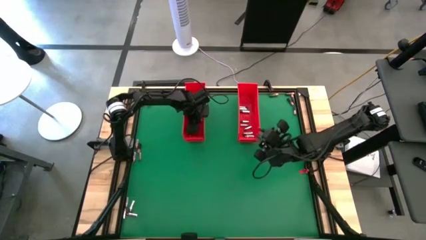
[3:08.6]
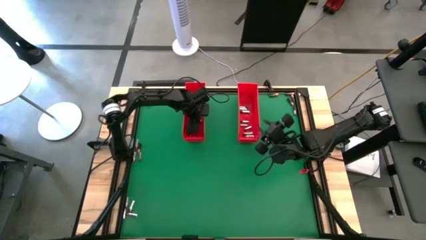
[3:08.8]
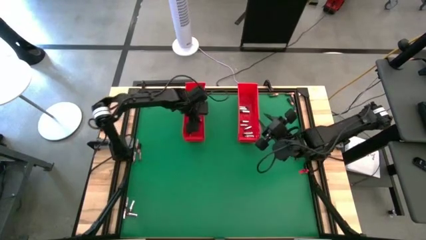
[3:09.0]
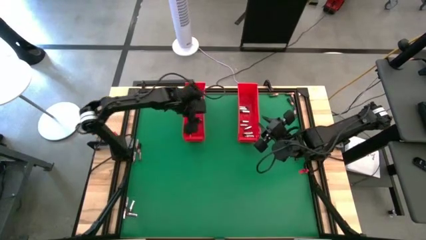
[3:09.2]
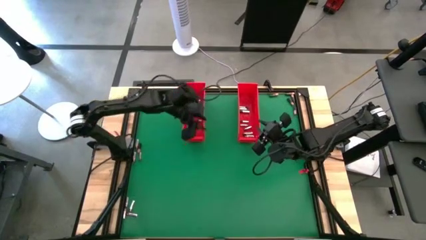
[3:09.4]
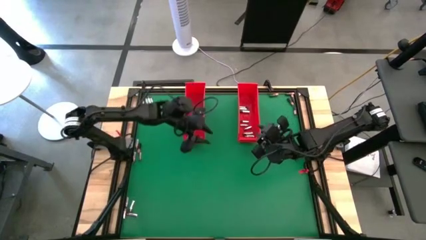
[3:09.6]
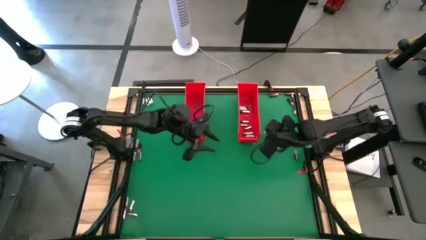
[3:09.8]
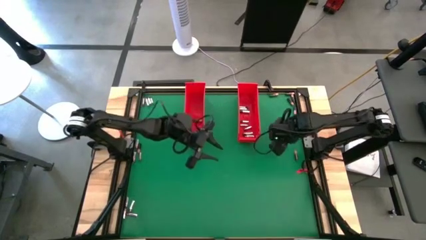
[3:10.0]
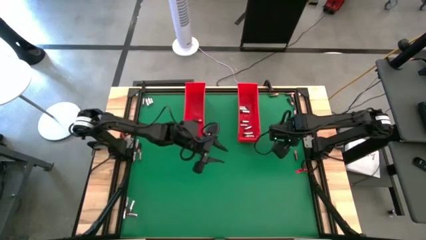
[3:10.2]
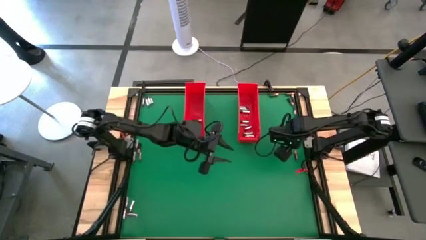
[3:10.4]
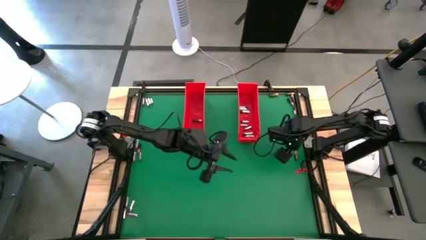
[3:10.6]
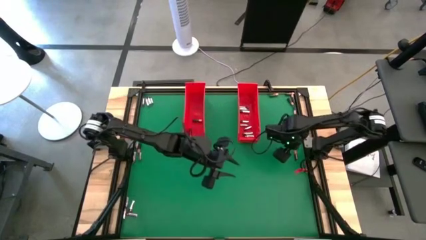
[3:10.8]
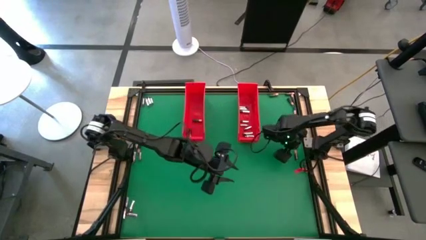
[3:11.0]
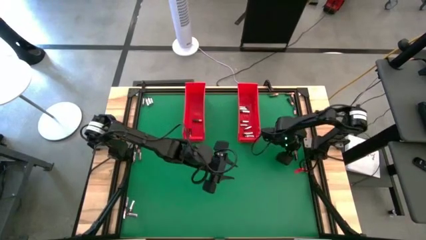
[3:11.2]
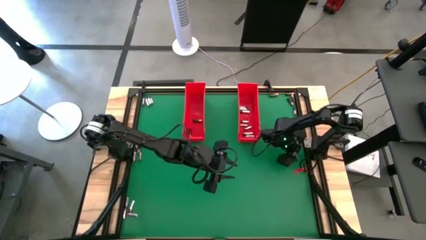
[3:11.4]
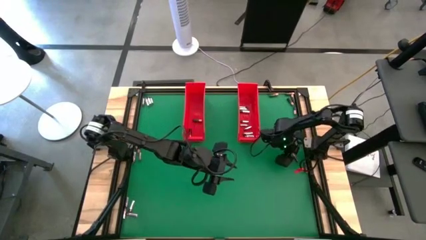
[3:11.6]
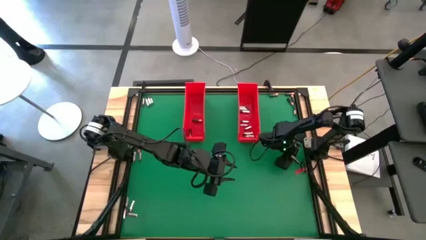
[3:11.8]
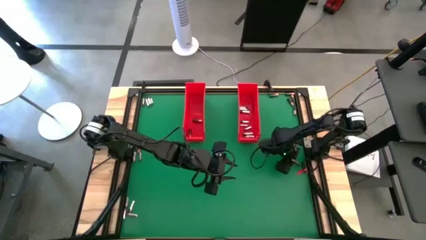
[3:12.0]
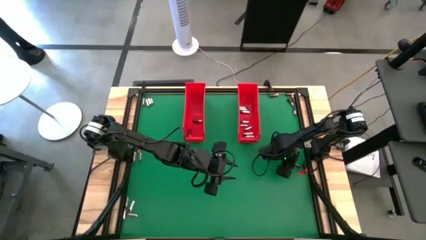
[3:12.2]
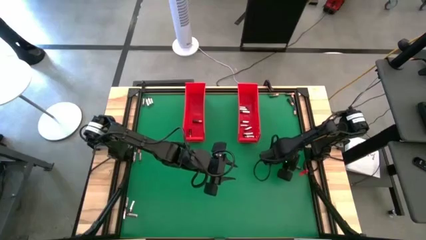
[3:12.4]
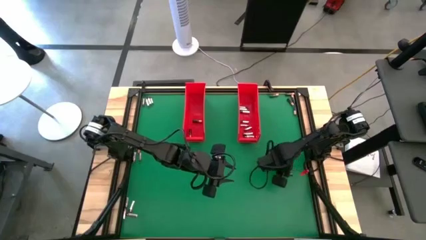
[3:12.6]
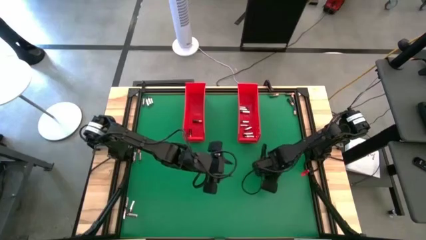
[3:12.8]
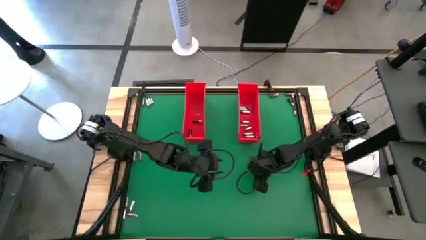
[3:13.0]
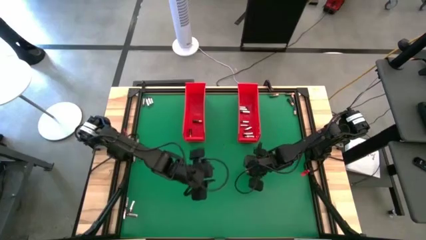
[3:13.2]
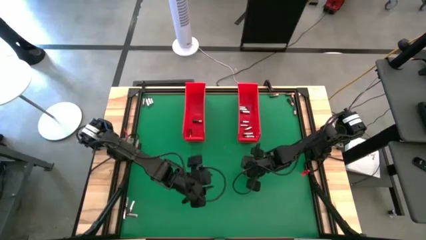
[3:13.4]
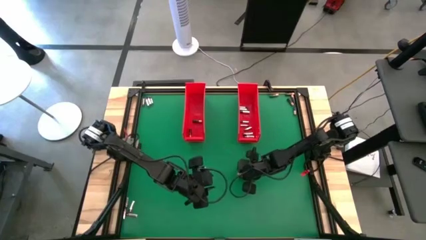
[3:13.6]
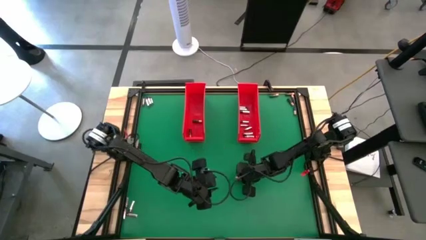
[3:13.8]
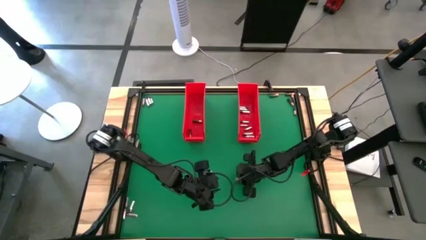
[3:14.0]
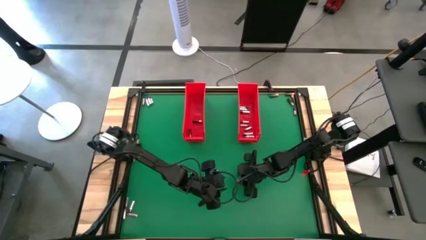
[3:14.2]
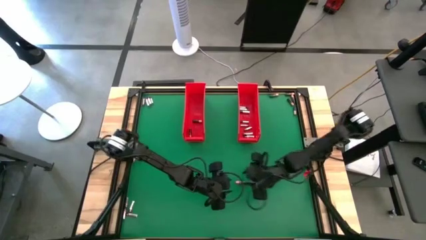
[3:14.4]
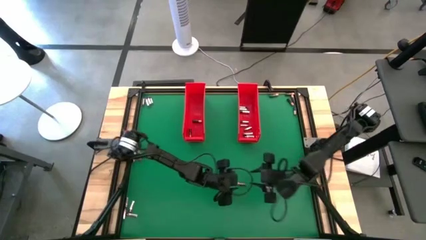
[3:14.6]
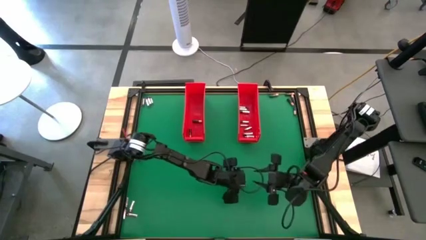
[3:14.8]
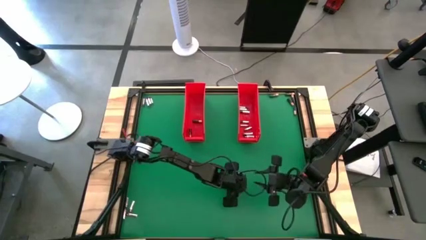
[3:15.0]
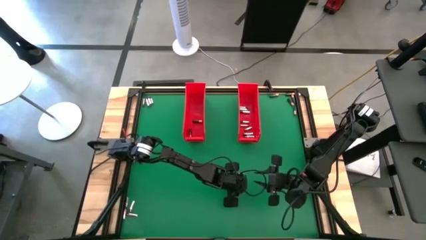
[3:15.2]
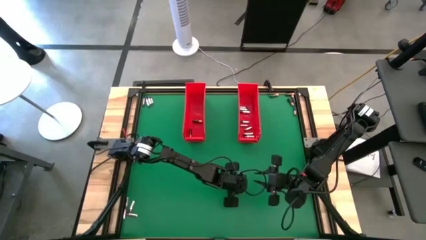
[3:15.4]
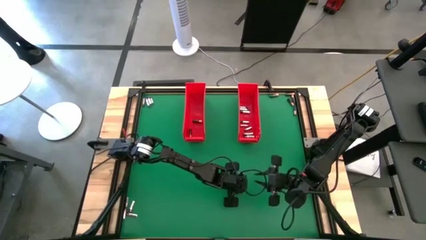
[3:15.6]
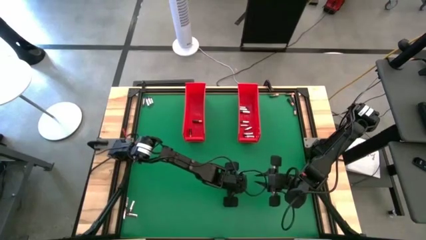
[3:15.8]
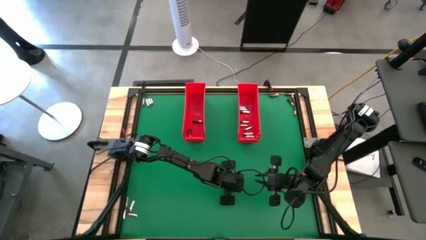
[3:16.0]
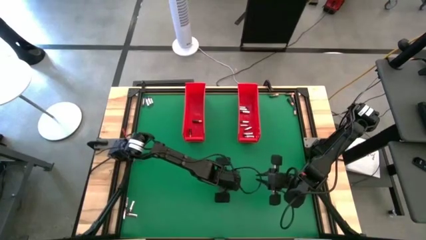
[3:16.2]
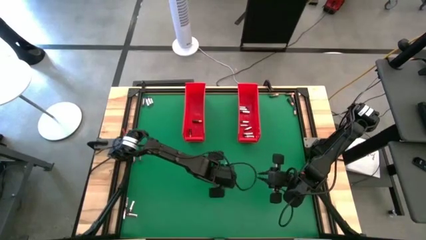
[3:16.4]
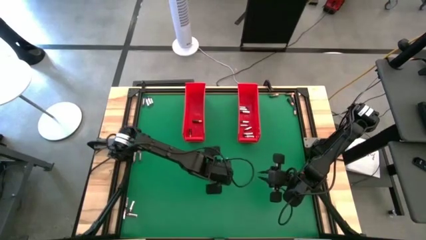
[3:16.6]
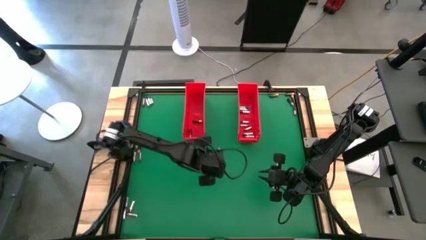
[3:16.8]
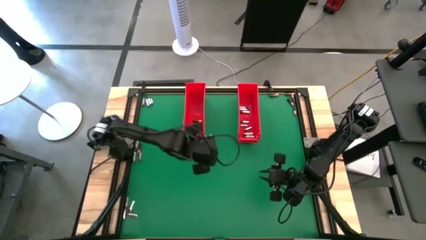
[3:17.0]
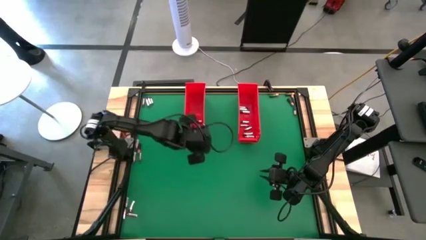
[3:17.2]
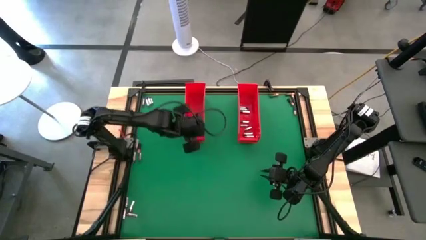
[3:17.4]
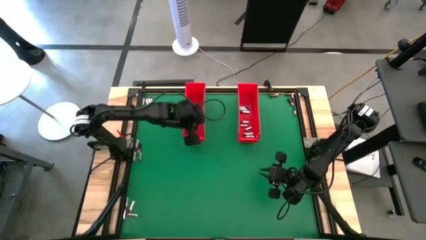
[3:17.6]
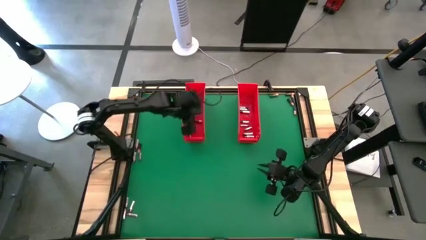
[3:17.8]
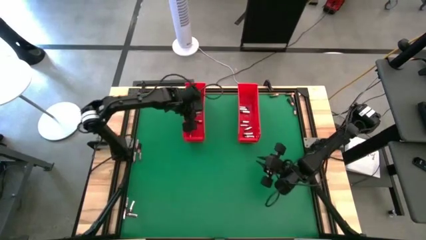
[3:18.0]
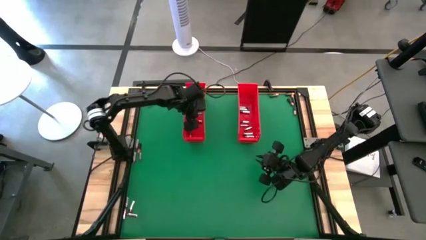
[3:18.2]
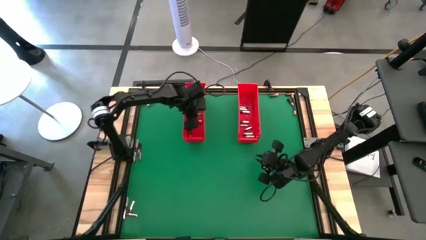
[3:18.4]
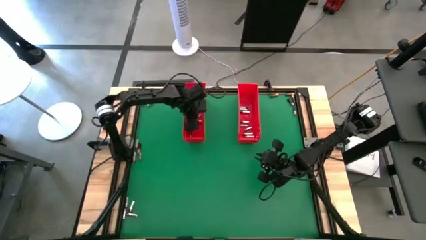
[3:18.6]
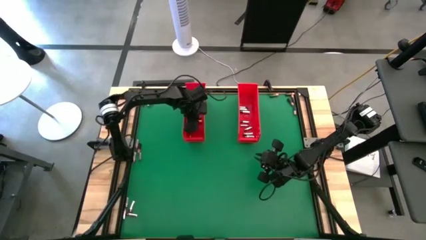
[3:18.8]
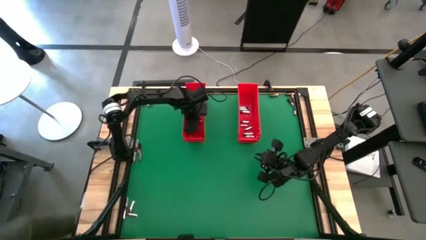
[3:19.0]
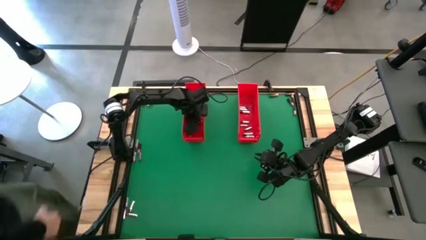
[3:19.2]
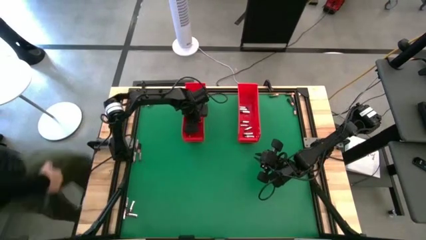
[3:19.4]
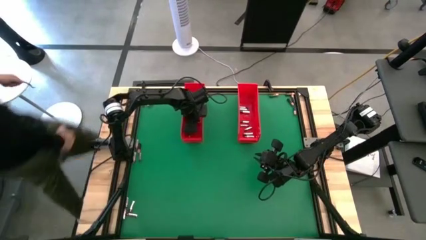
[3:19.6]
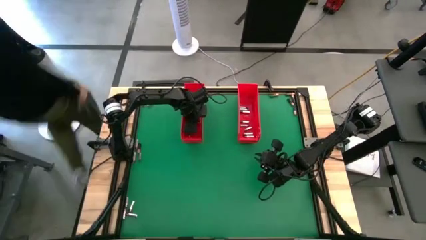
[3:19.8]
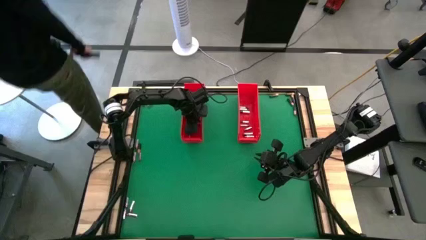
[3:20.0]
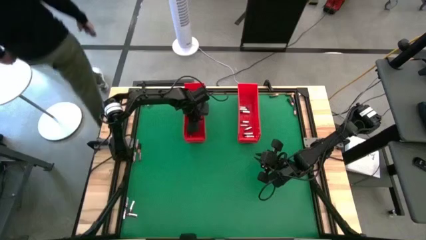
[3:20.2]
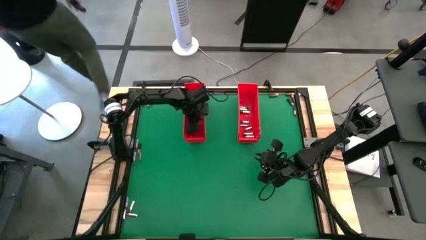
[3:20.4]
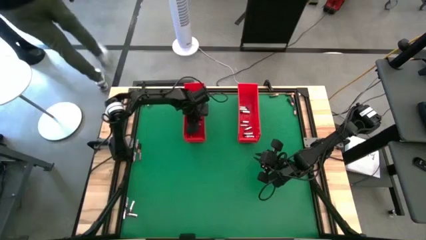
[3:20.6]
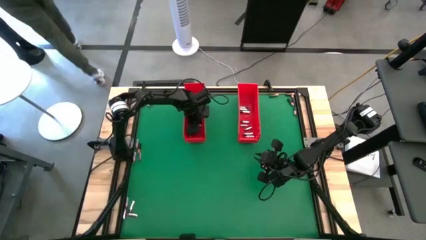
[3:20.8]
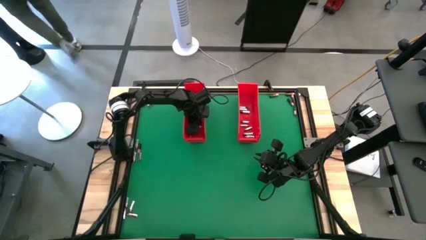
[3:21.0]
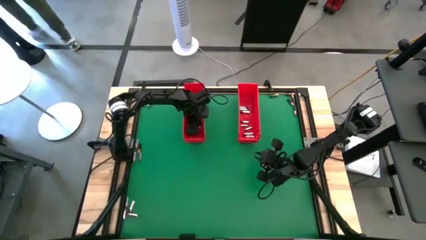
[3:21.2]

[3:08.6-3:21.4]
Task: Sort batteries
Put the brown battery into the left red bin

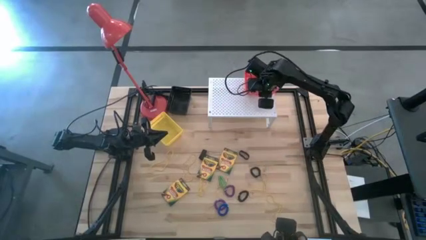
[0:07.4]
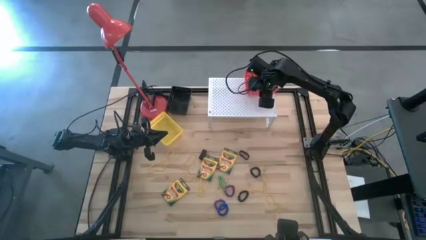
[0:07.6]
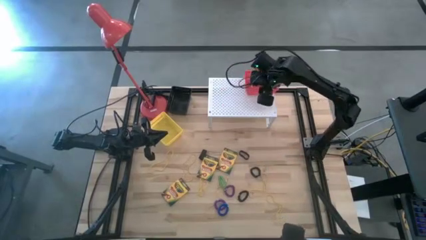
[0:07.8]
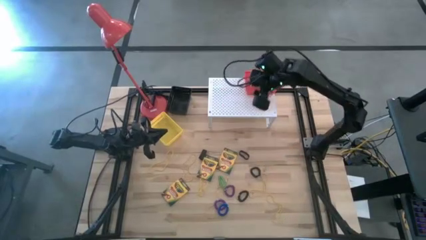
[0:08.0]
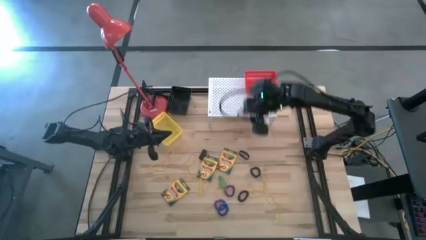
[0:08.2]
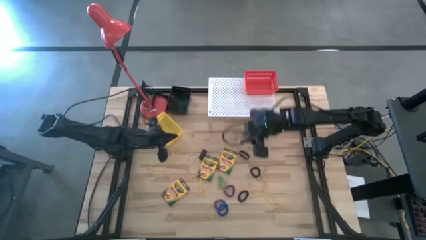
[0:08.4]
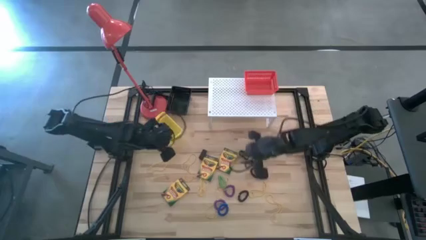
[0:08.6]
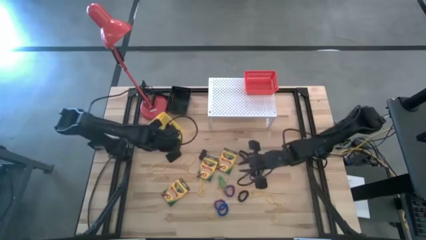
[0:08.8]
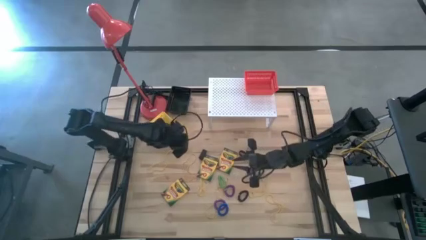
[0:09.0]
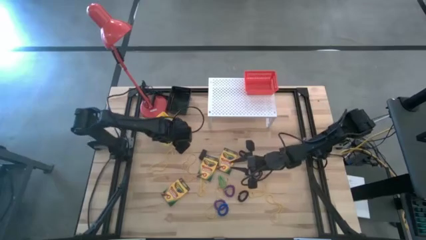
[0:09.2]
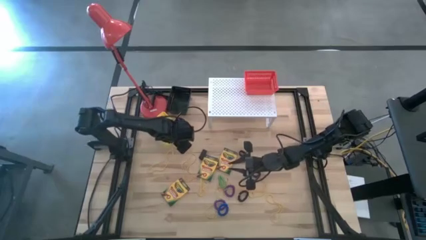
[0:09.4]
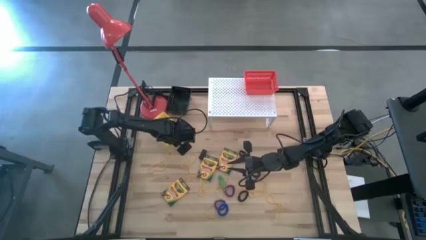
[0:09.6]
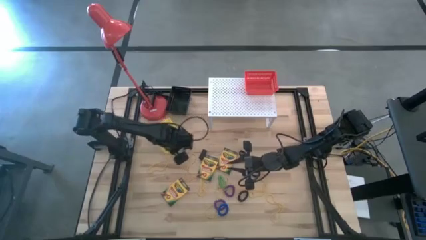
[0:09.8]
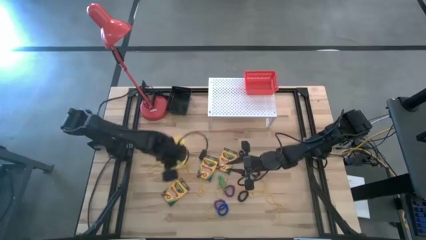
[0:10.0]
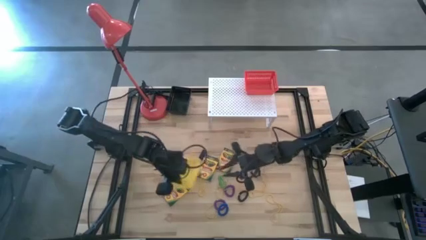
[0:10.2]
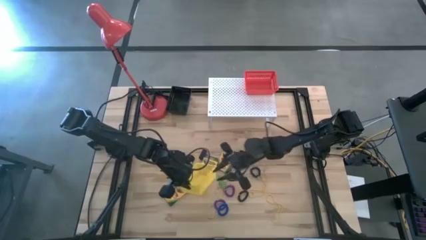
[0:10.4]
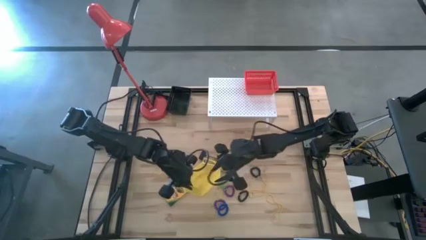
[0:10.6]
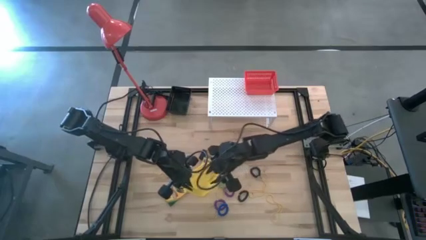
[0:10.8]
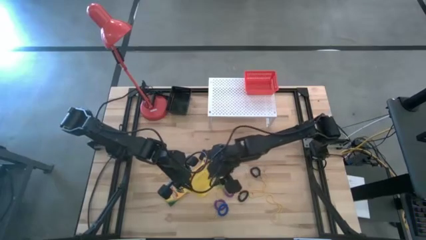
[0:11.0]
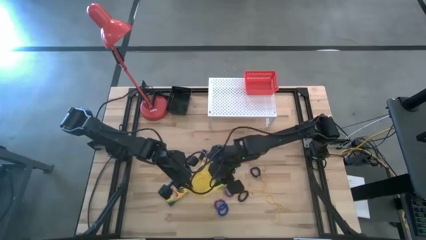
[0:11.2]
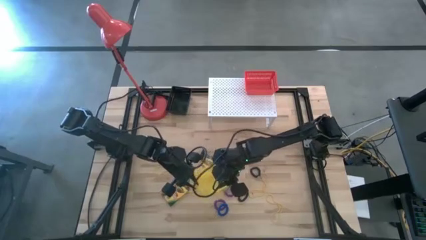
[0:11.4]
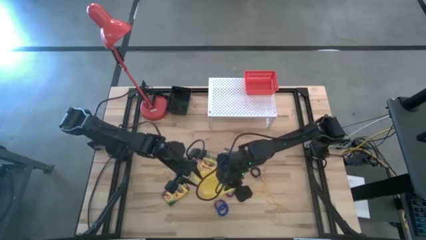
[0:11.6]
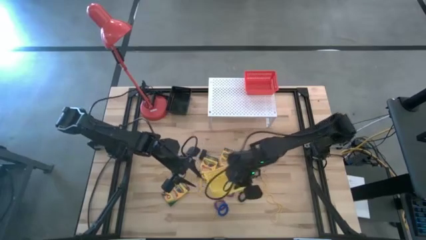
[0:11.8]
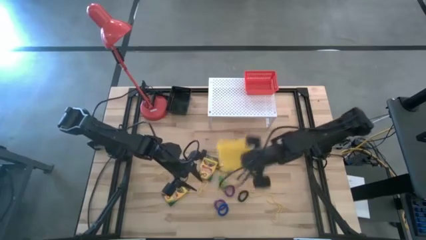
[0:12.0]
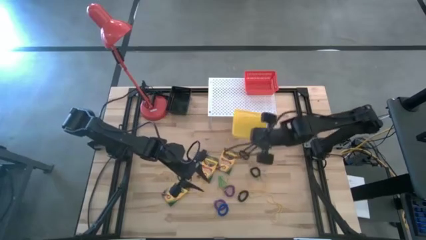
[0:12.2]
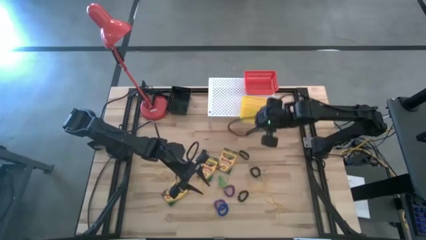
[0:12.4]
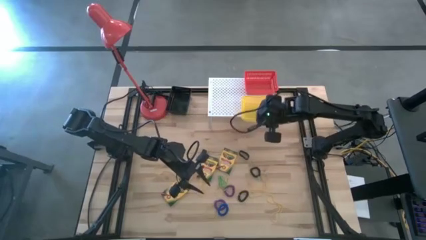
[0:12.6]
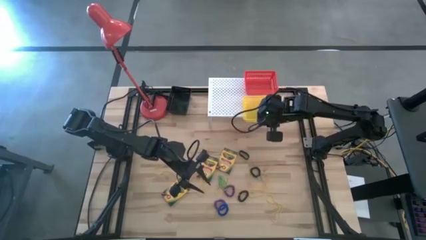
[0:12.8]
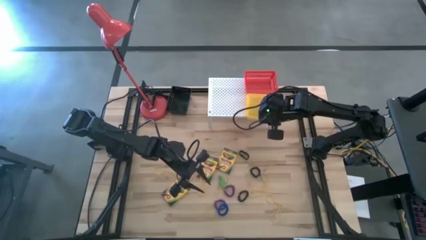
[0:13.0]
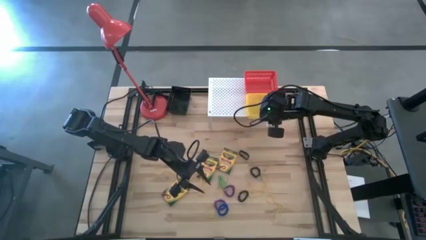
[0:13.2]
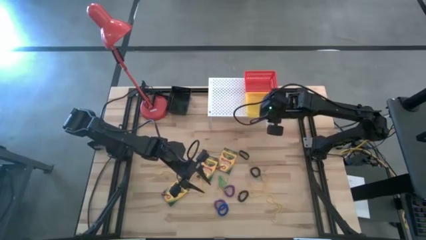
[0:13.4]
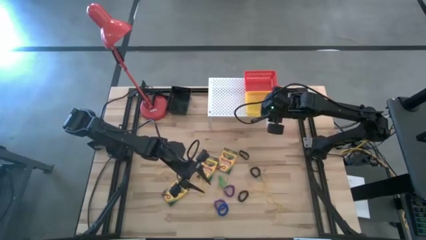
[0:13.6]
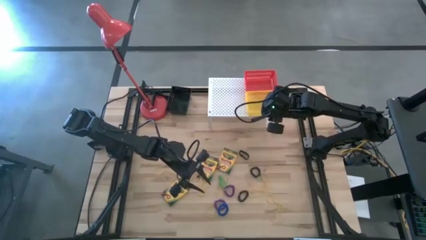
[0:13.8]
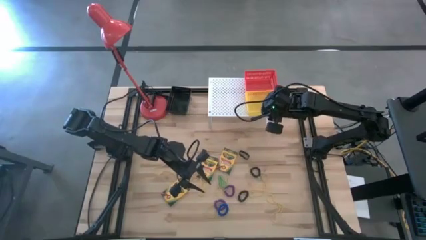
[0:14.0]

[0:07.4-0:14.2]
Task: Pick & Place Office Desk Supplies
Put the yellow bin on the shelf
